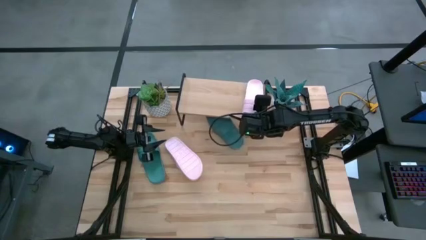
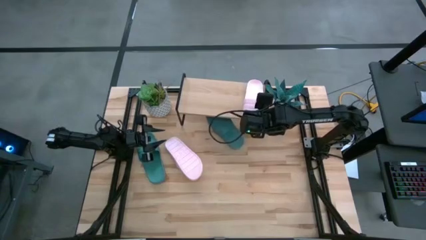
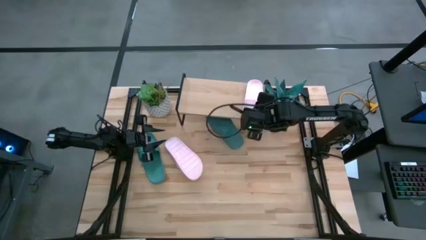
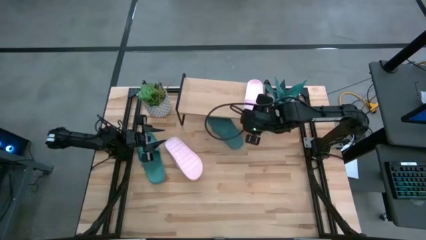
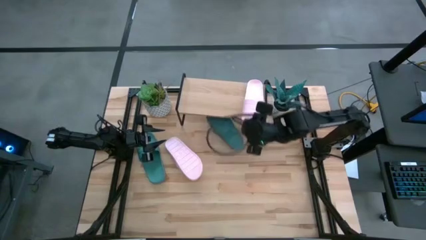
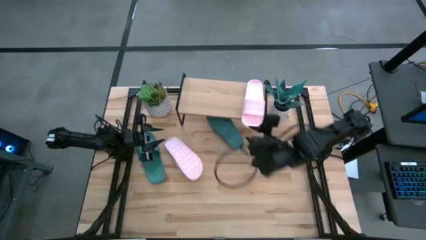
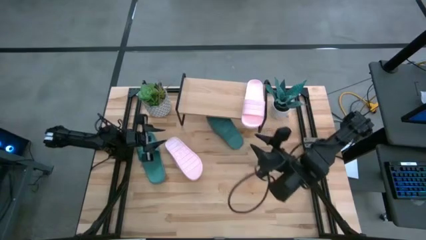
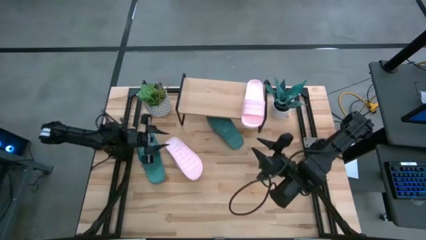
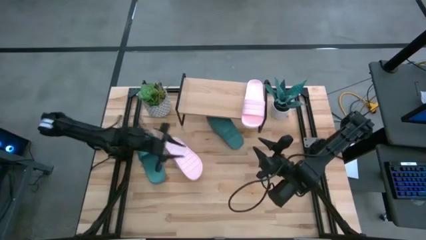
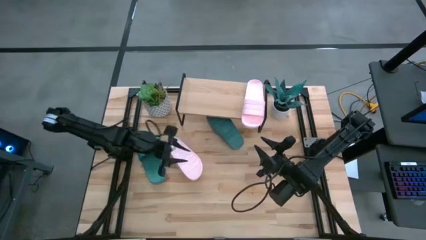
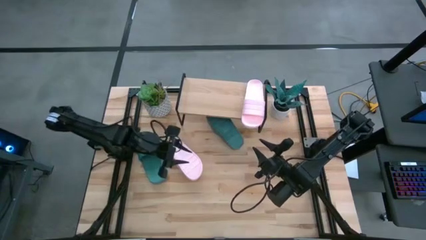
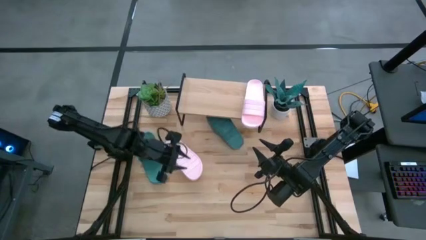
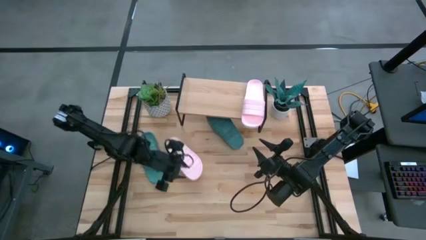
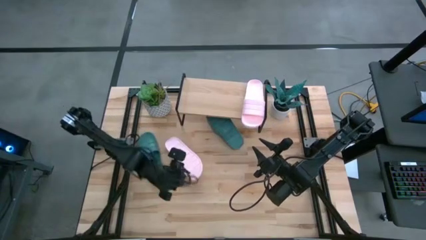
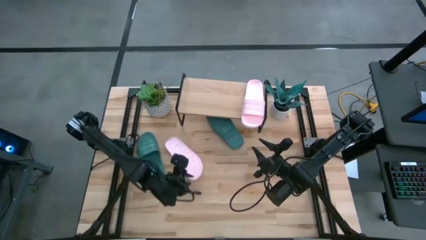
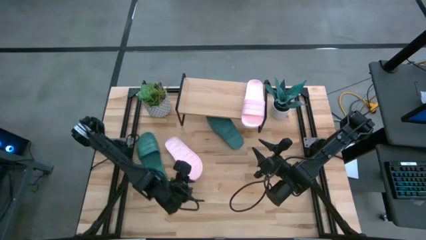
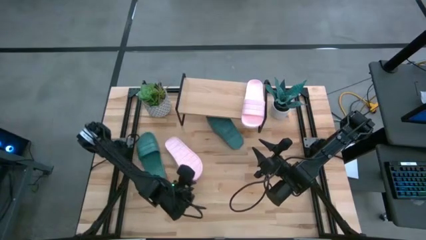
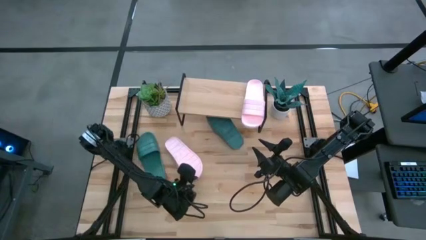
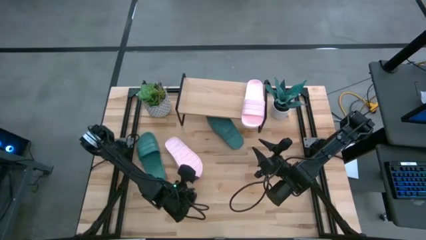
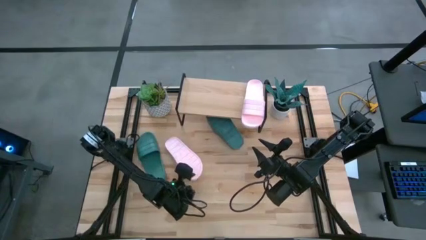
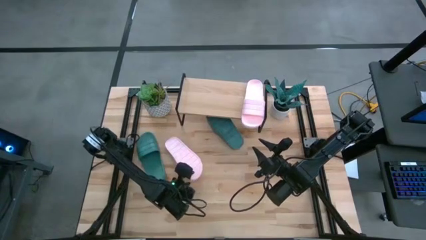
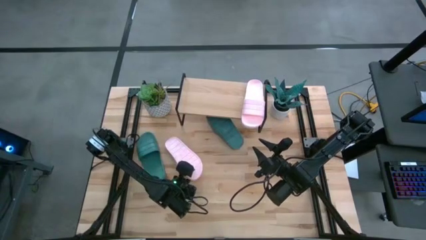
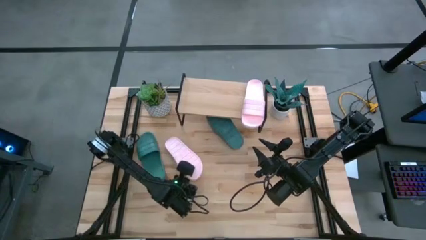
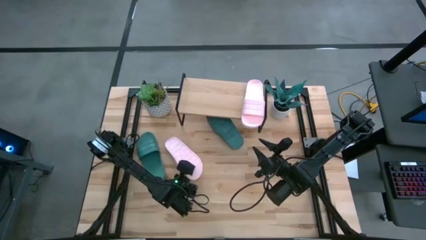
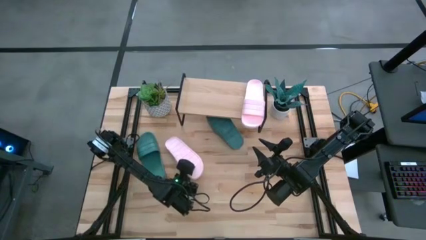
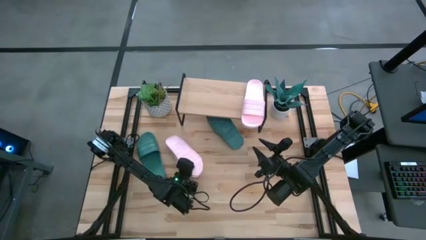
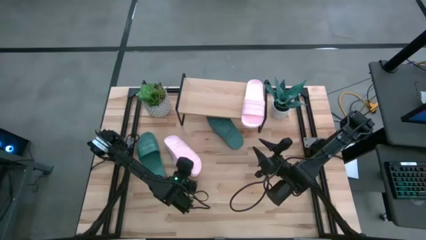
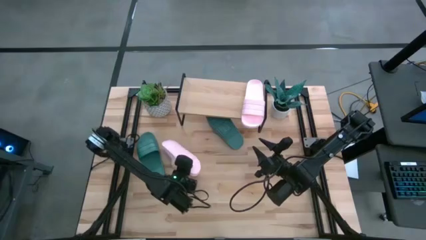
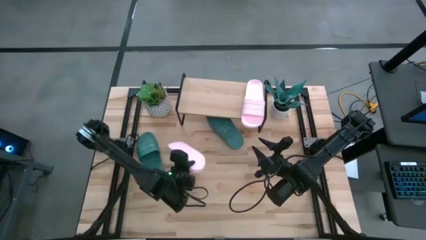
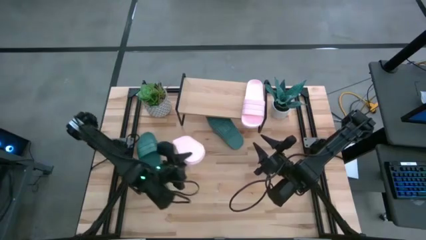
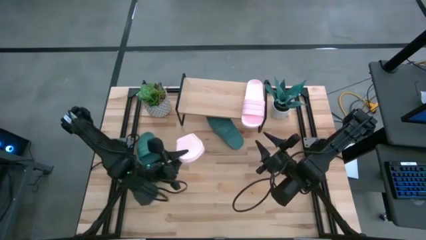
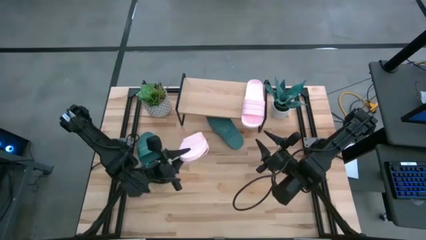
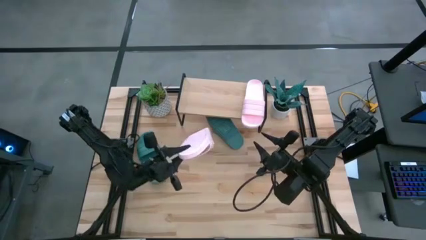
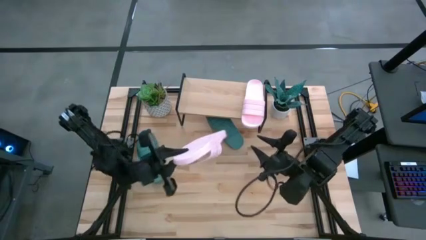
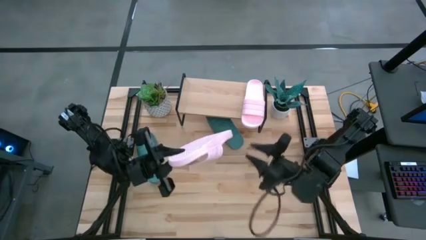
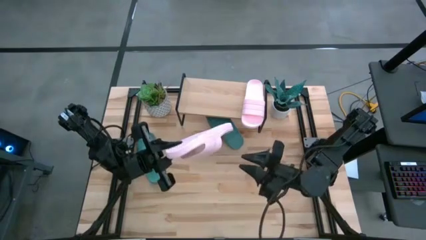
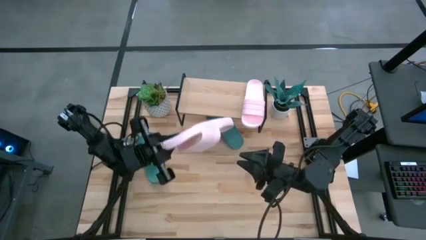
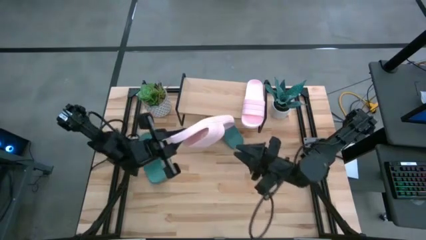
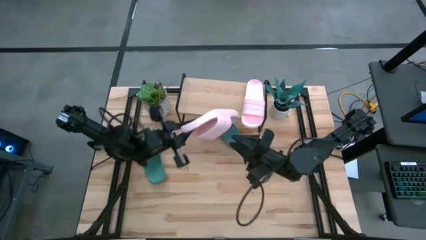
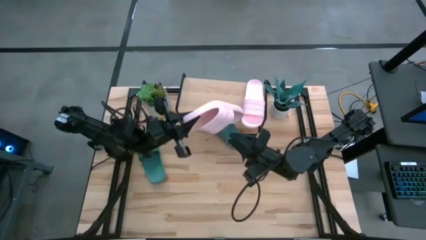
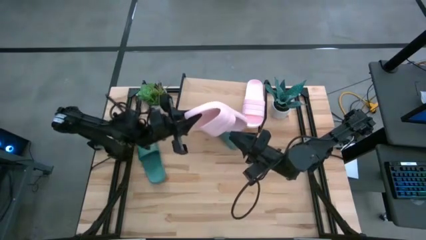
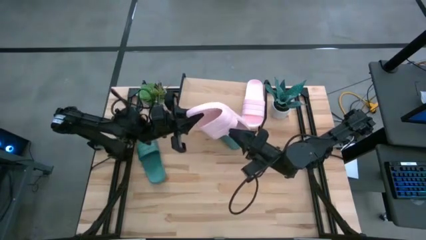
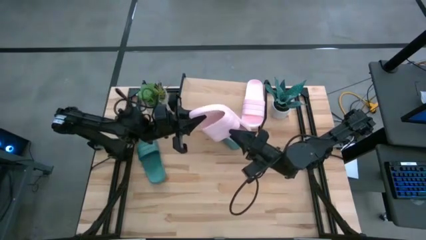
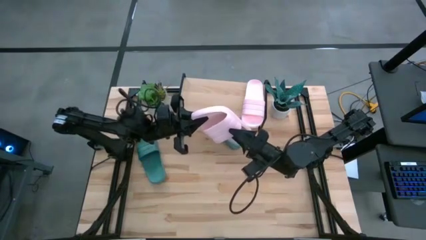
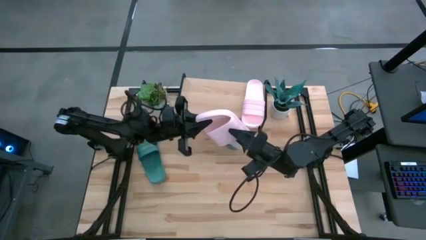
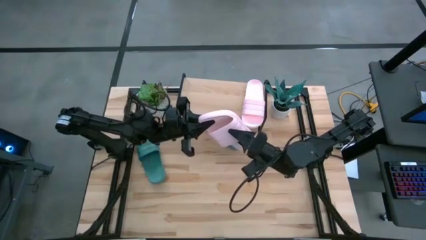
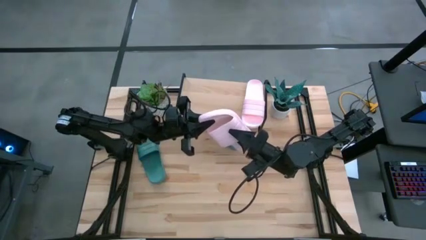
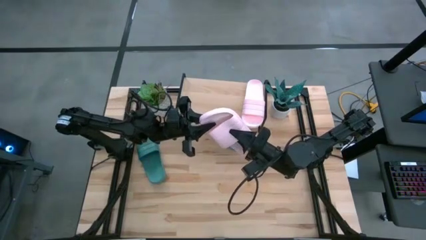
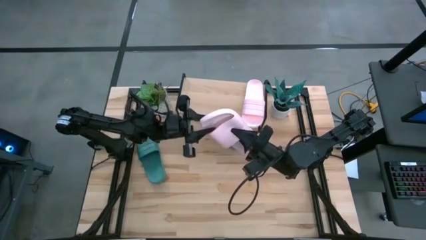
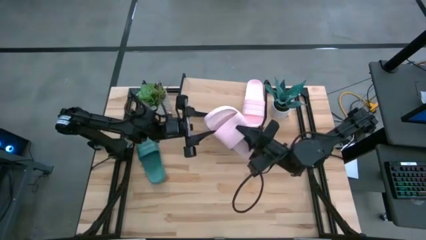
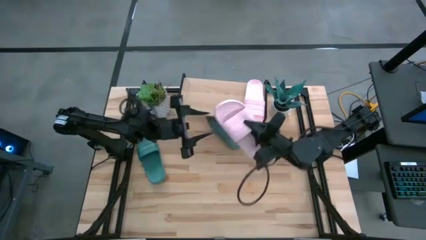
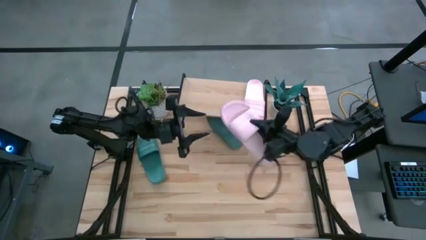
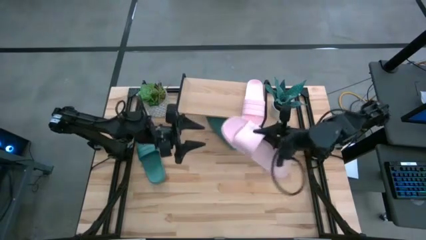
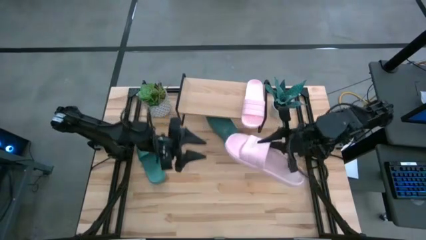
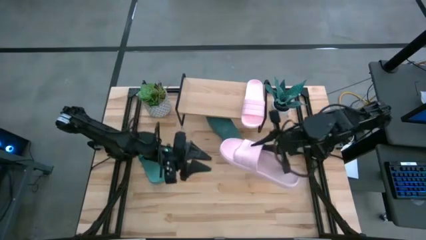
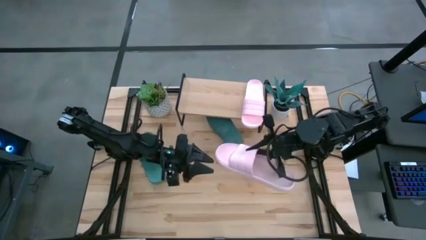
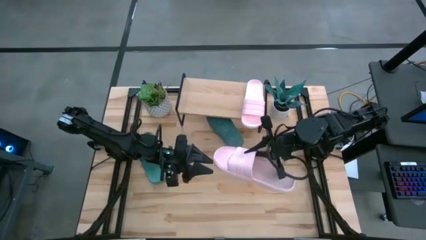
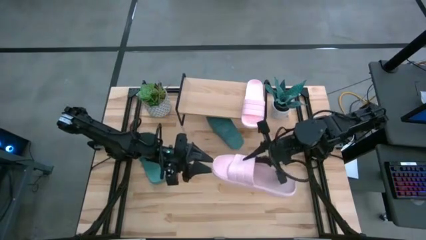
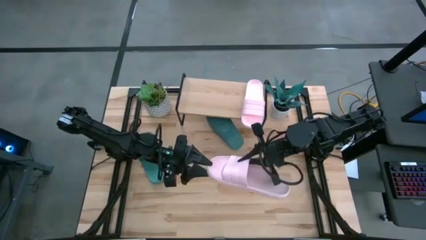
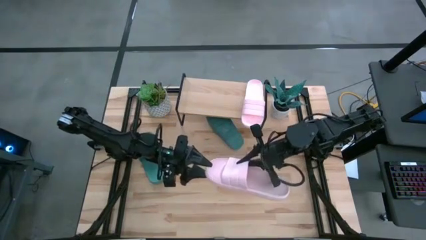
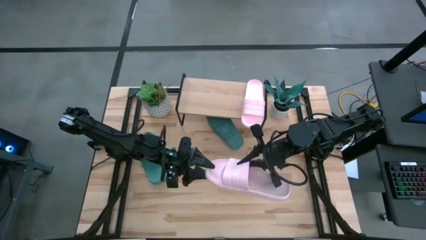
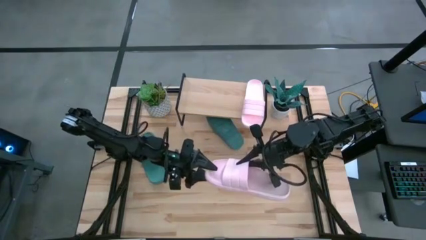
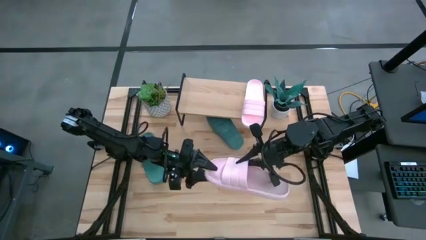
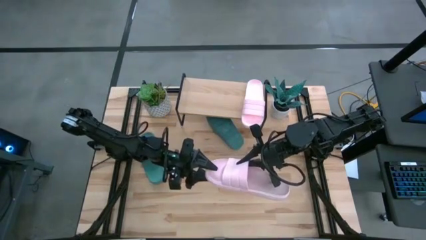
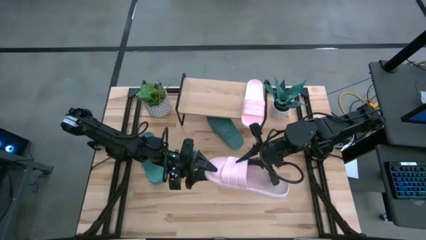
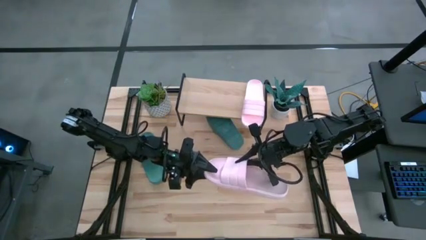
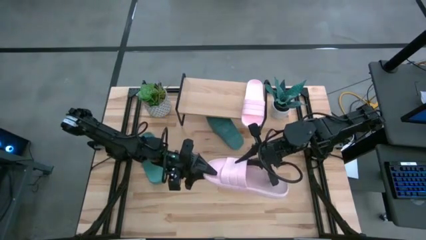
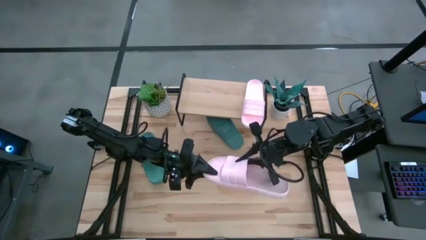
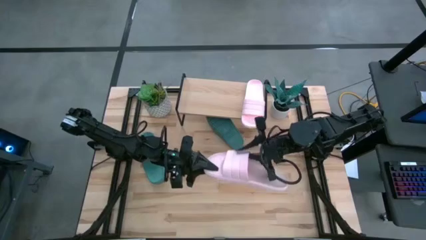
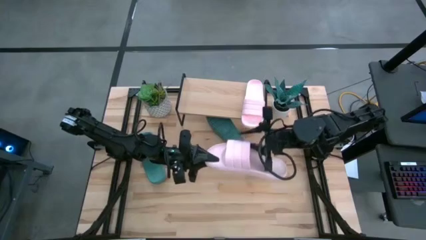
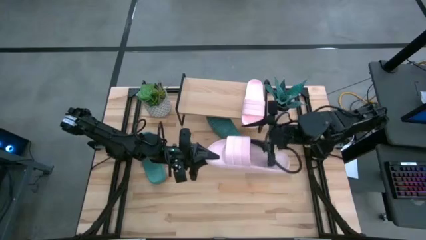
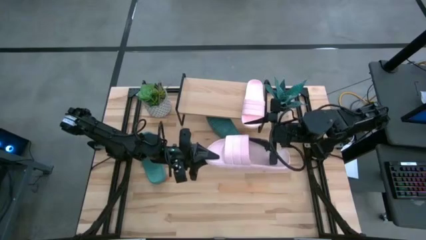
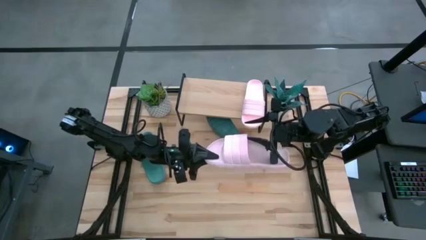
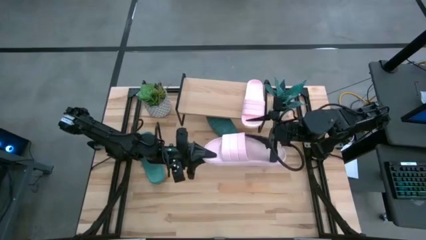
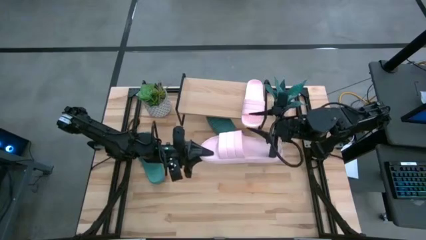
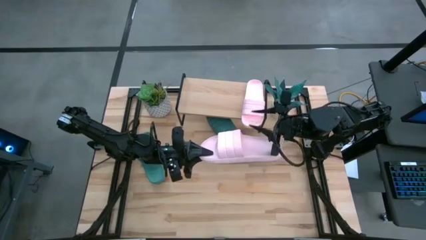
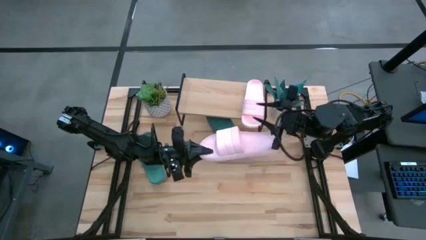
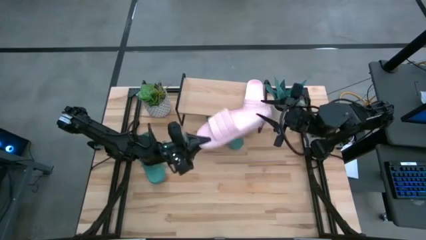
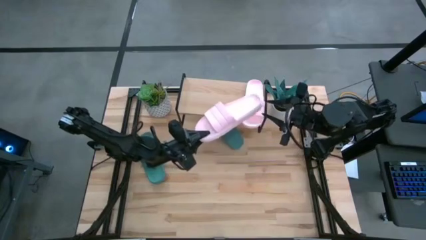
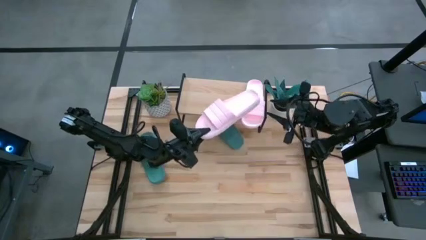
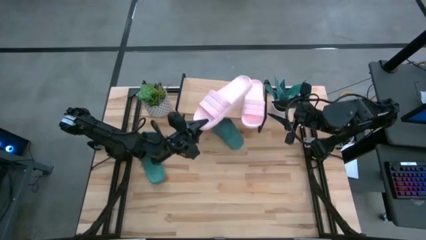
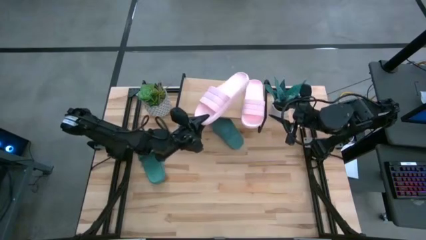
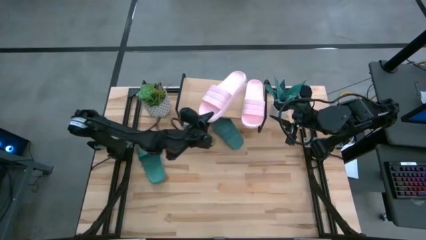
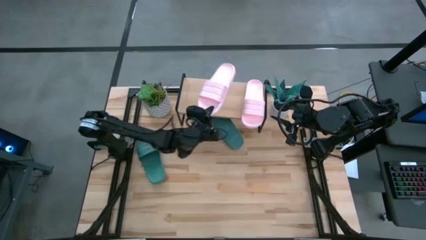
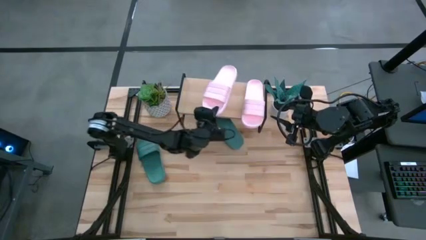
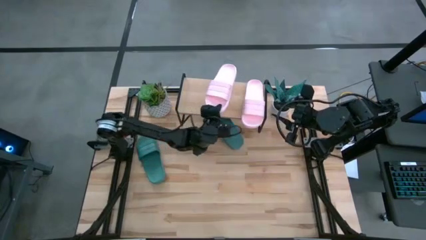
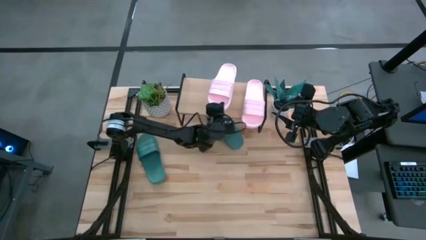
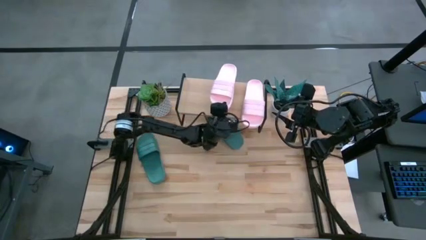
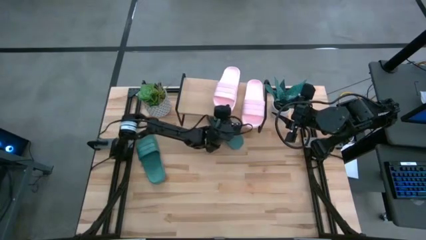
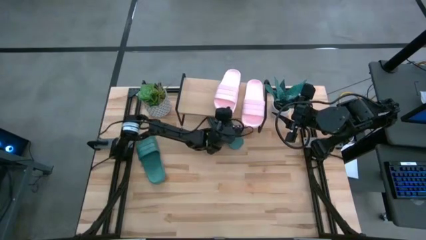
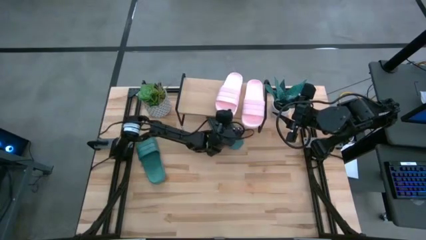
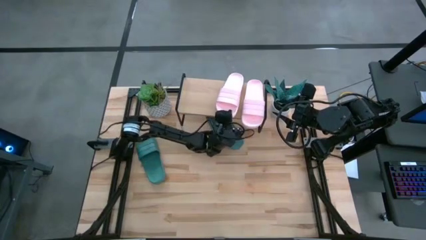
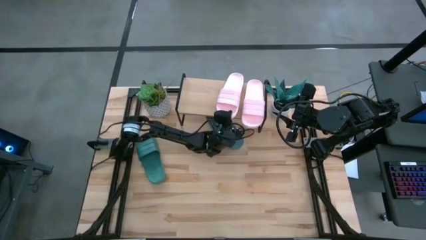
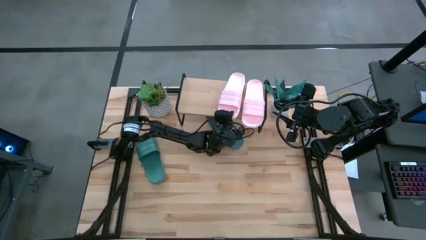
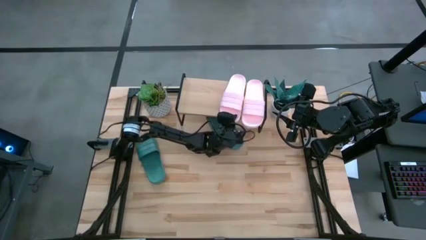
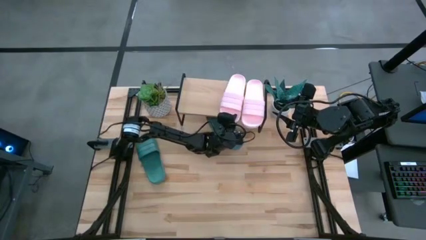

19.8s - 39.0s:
Task: Pick and place slides into the shelf
Put the pink slides on the shelf
